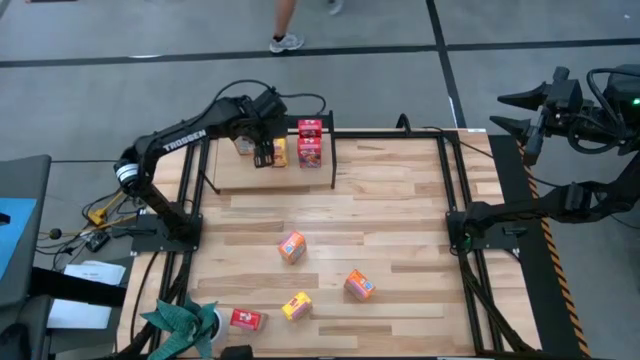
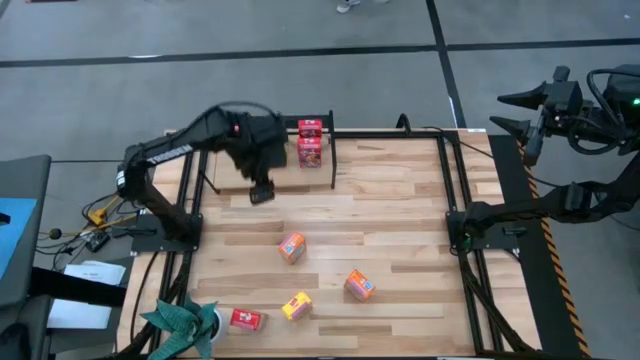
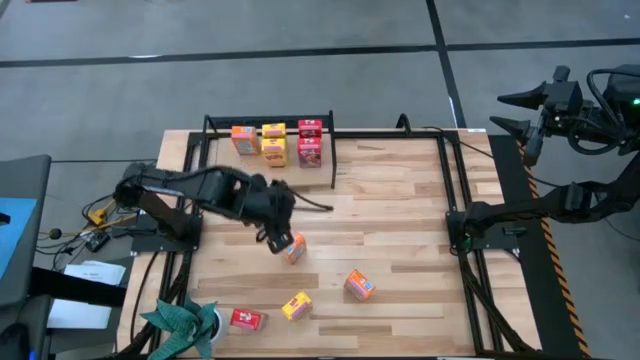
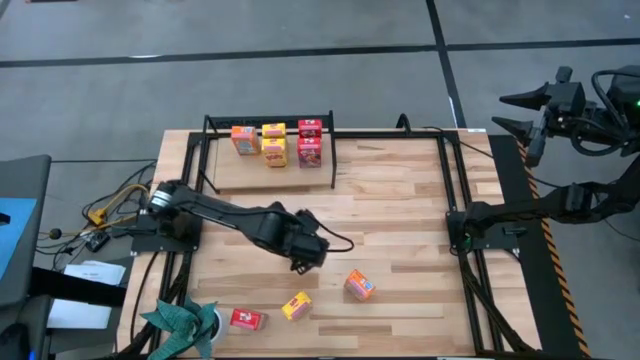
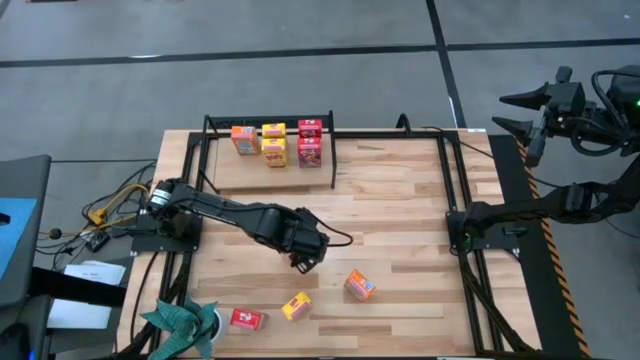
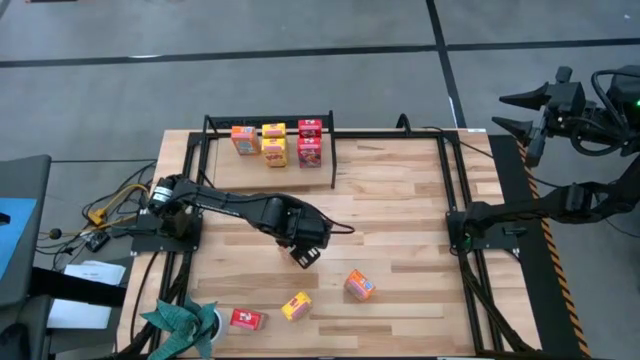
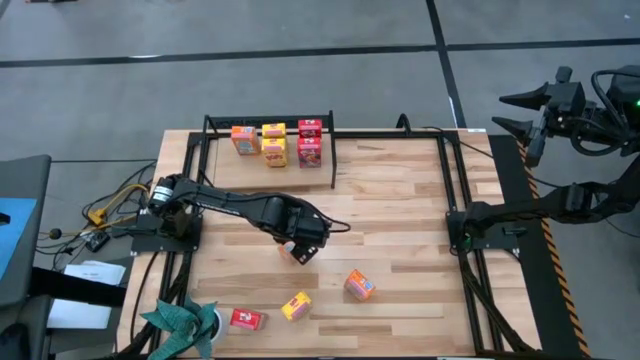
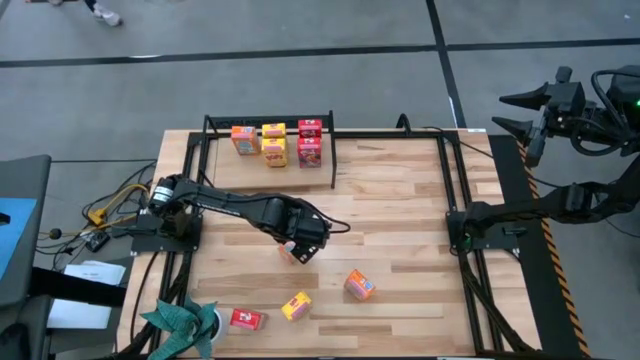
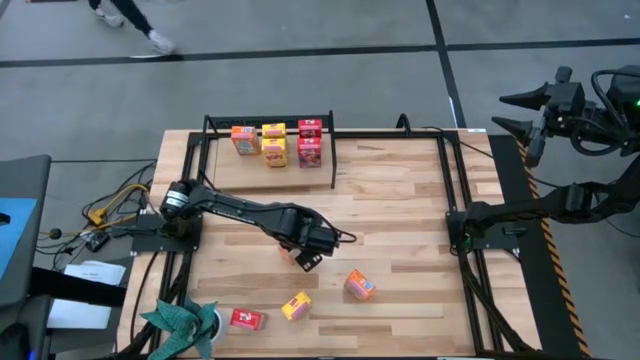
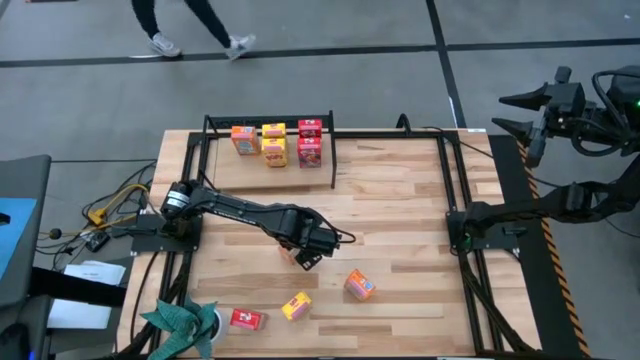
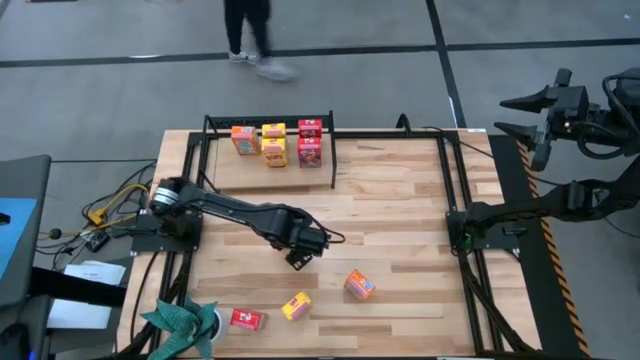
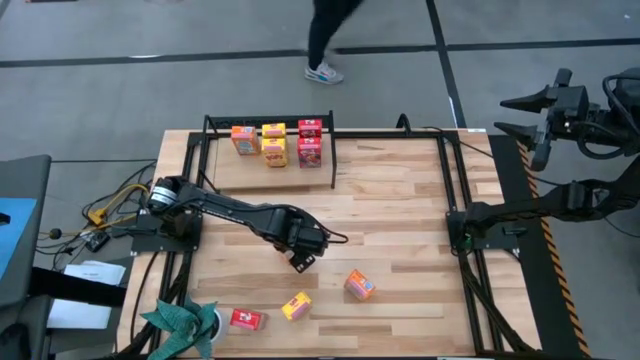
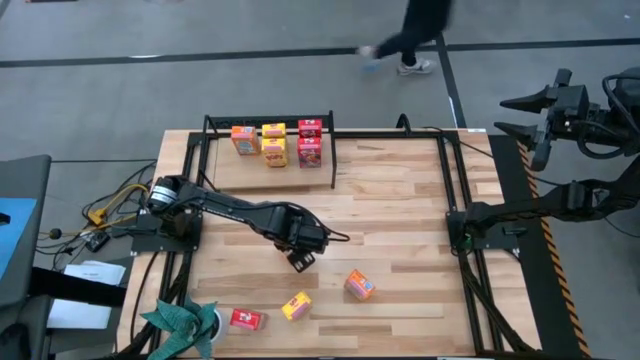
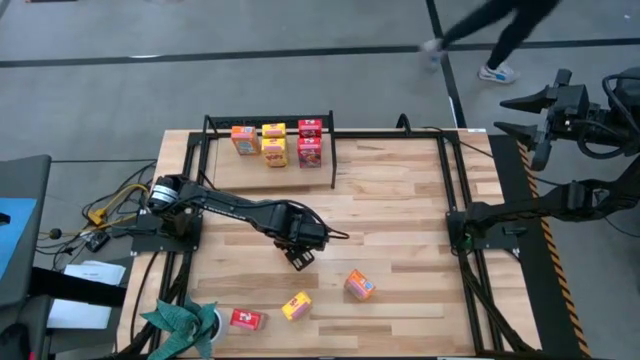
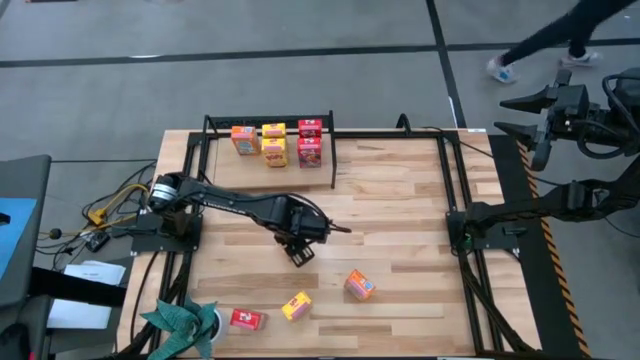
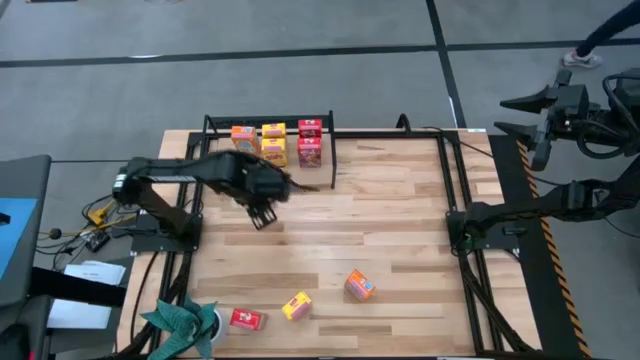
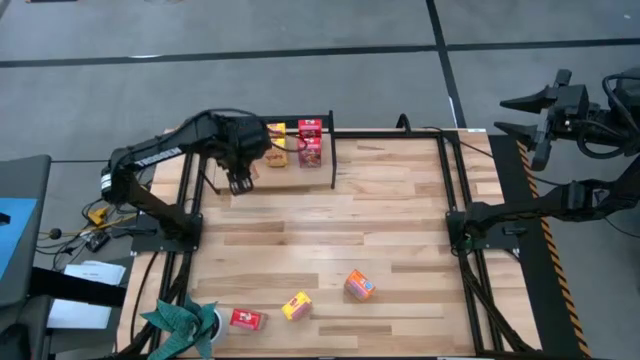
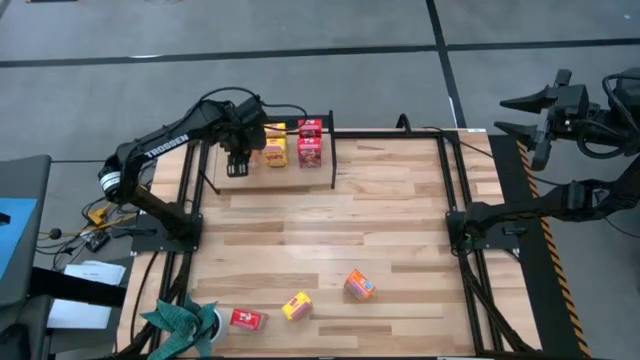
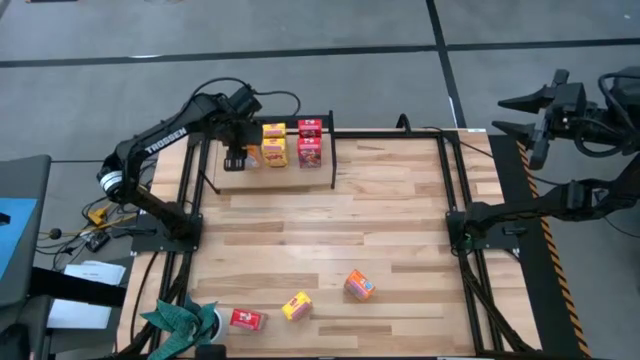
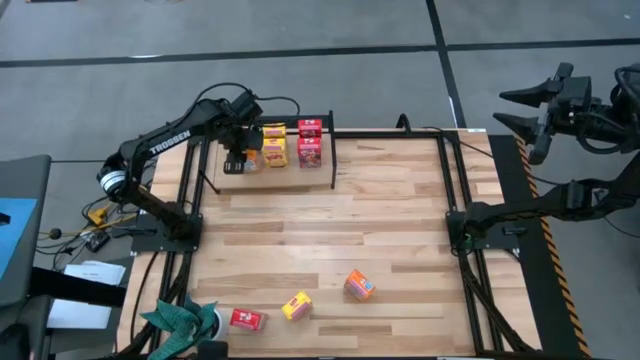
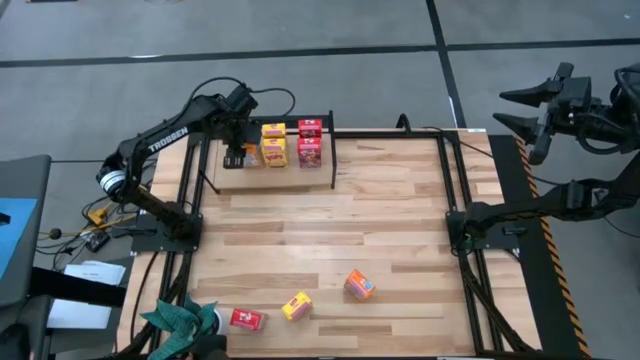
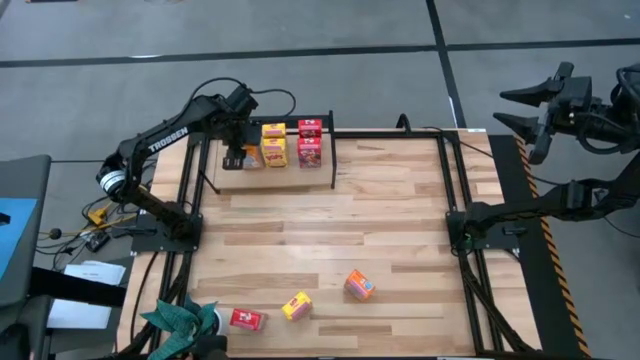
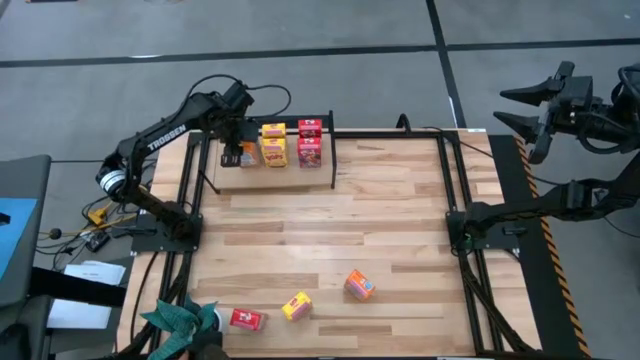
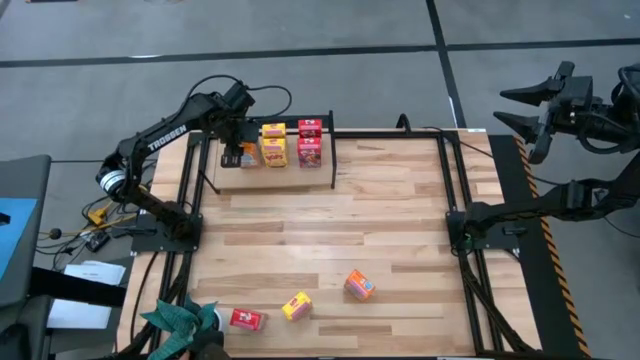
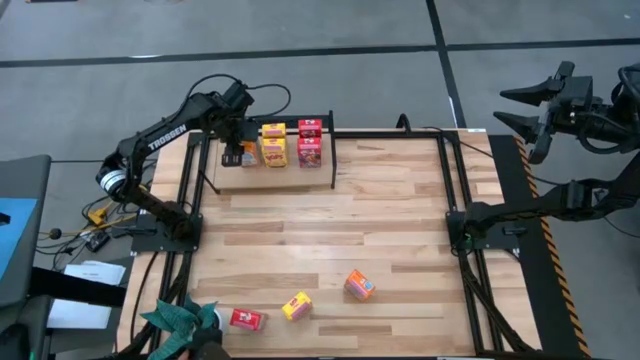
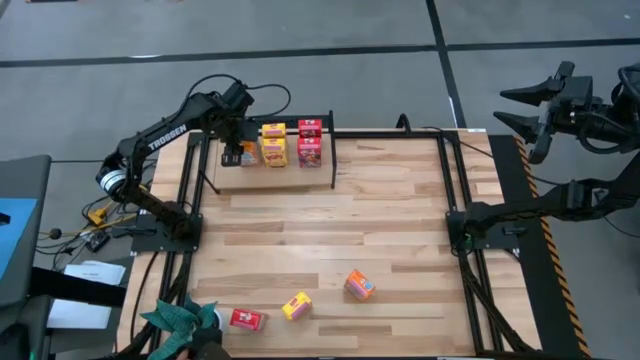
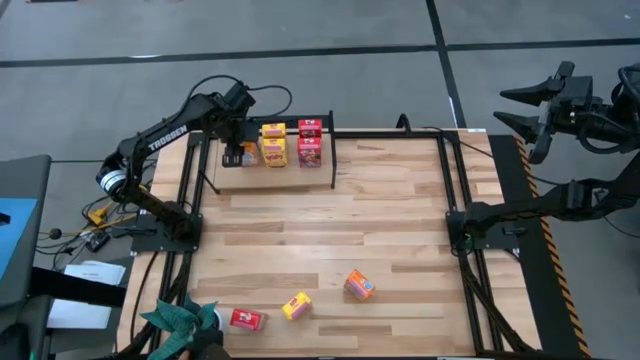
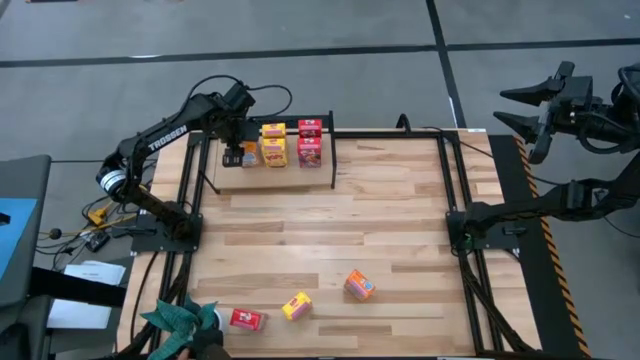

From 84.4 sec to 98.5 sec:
Task: Stack cereal on shelf
Put the top orange cereal box on the shelf aligned with the other orange cereal box

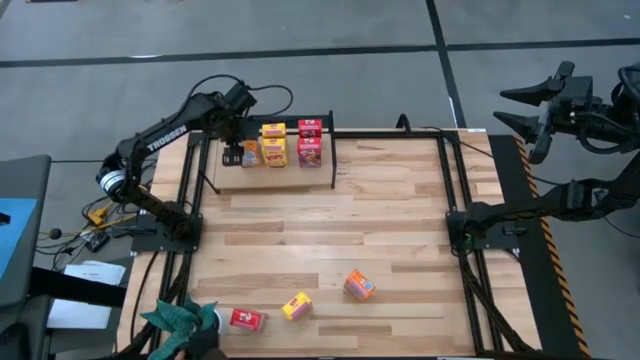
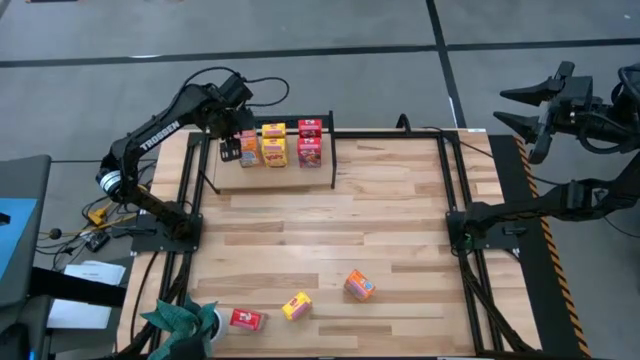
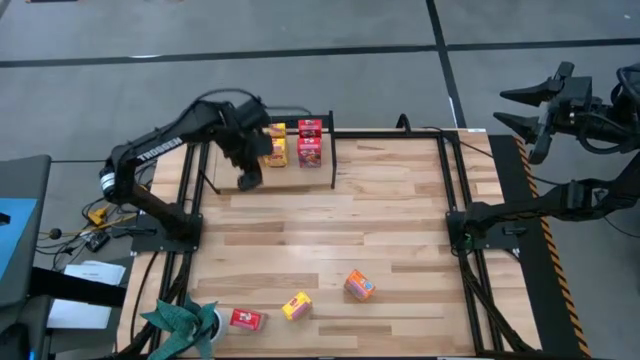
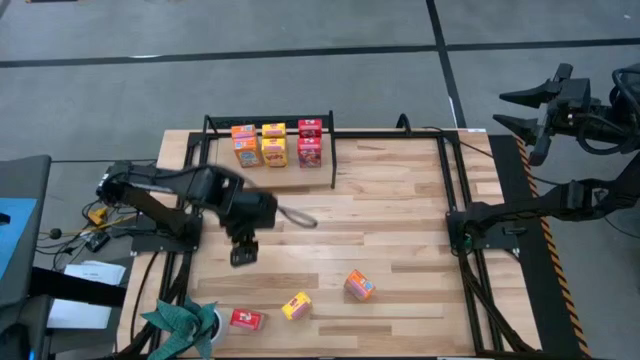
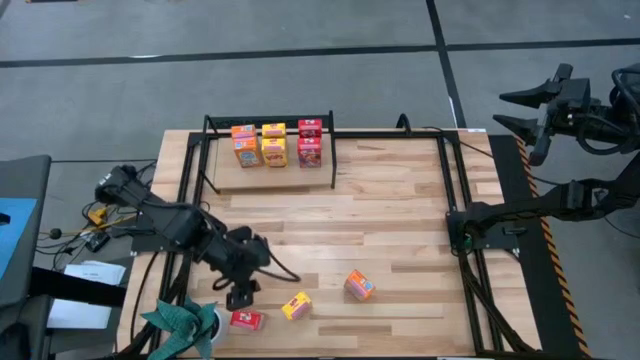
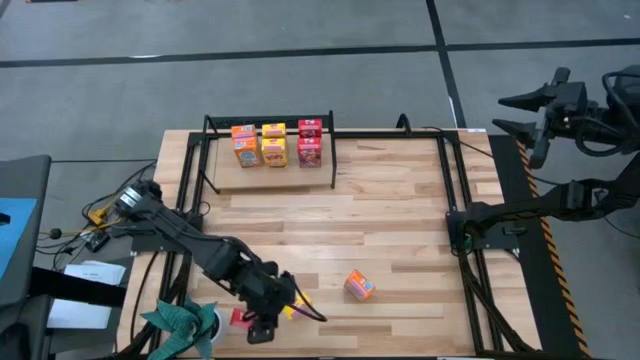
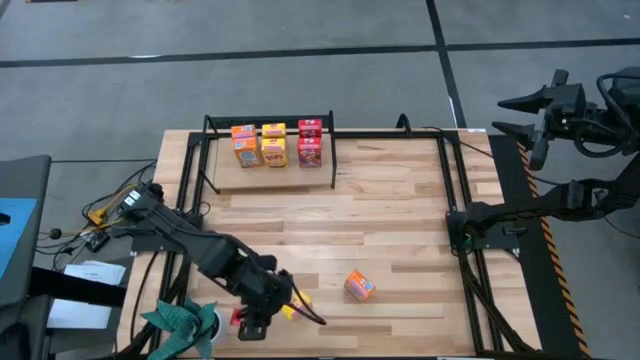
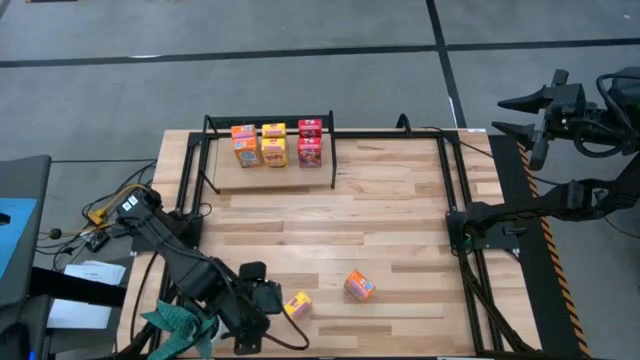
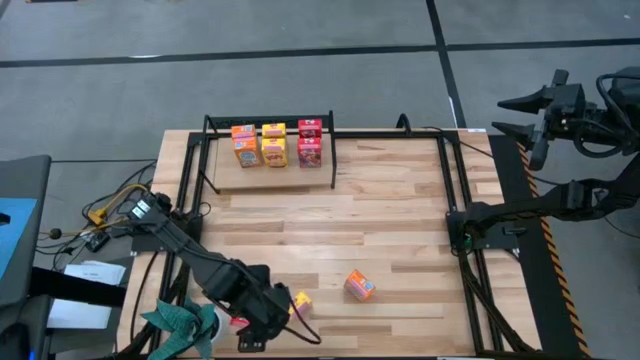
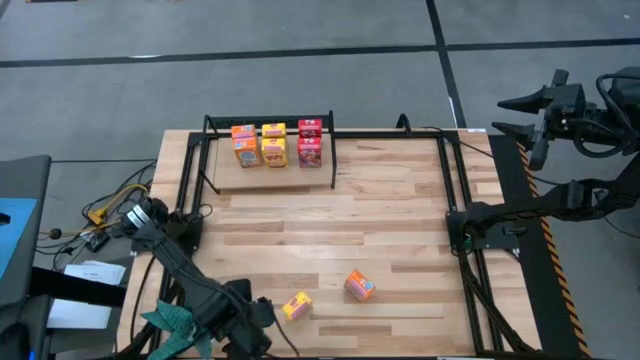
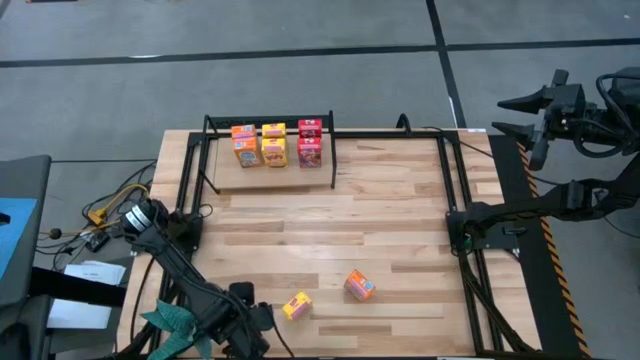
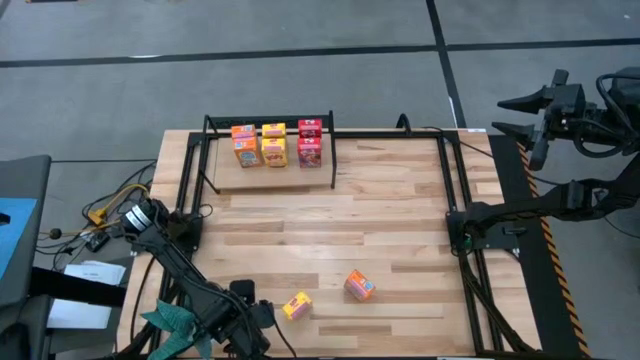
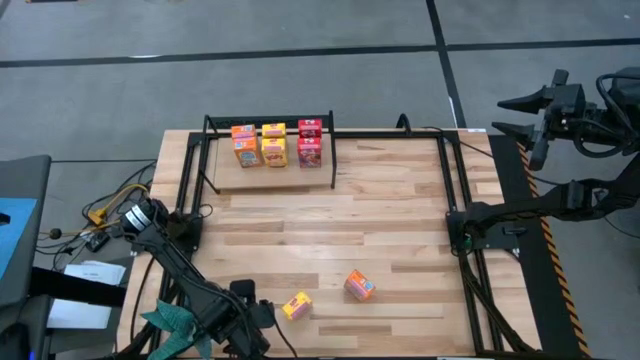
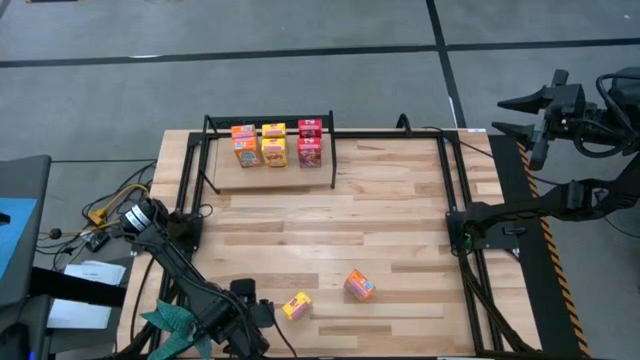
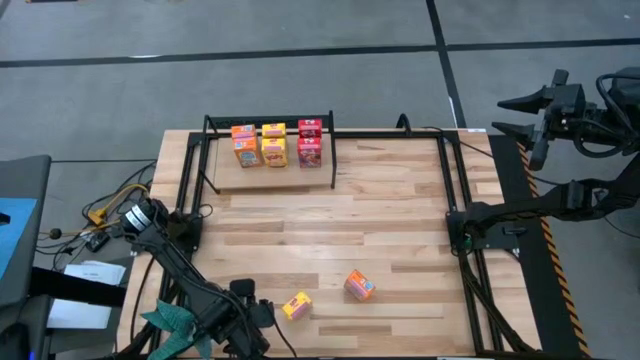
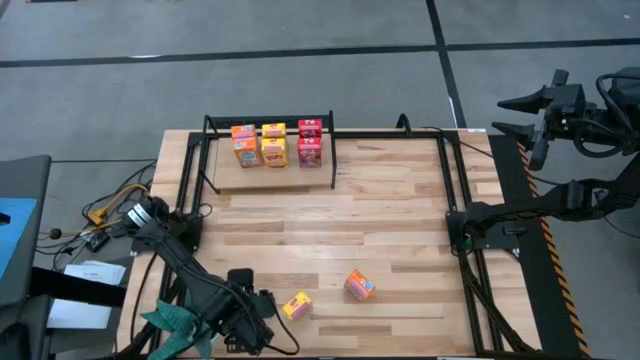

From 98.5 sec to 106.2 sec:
Put the red cereal box on the shelf aligned with the other red cereal box

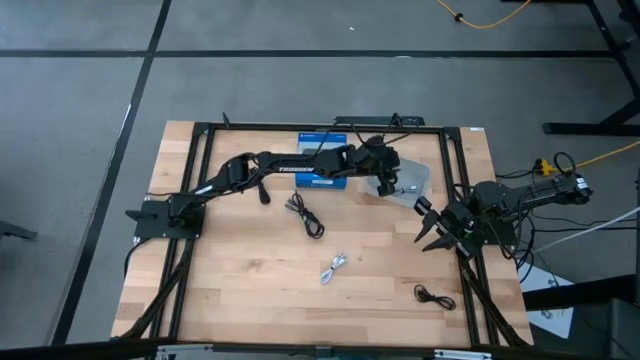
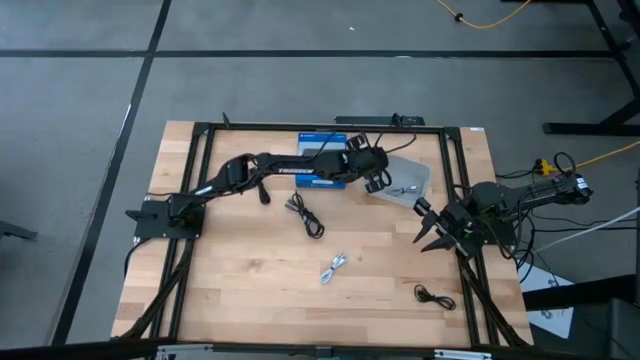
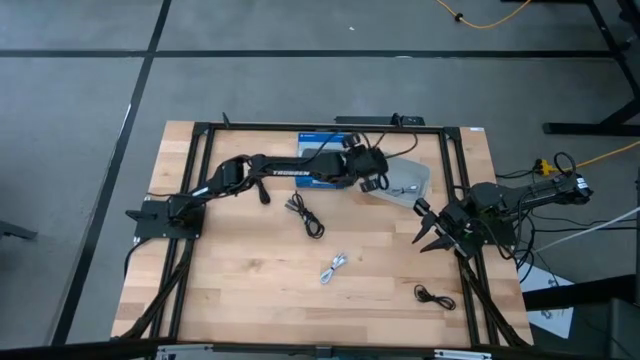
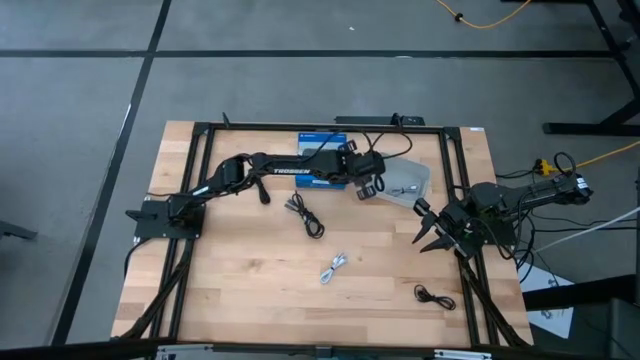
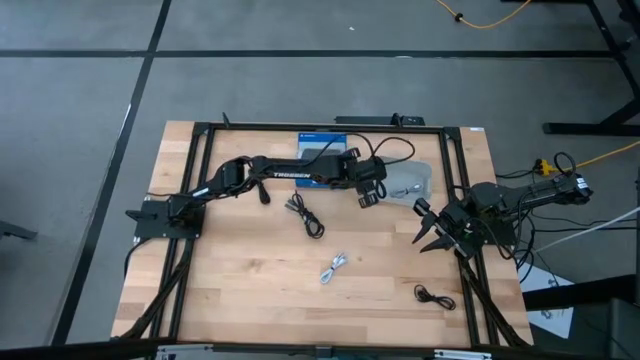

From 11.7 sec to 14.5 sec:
Task: Pick and place USB-C Cables
Adjust the gray bin
